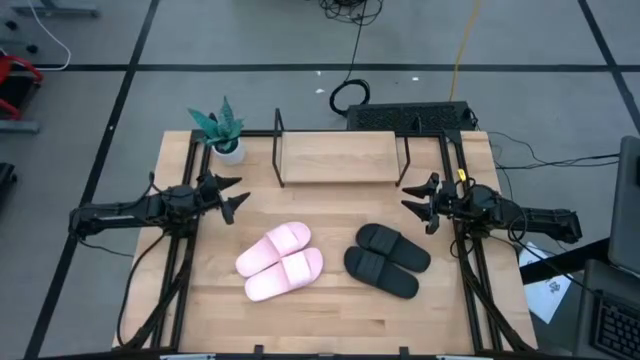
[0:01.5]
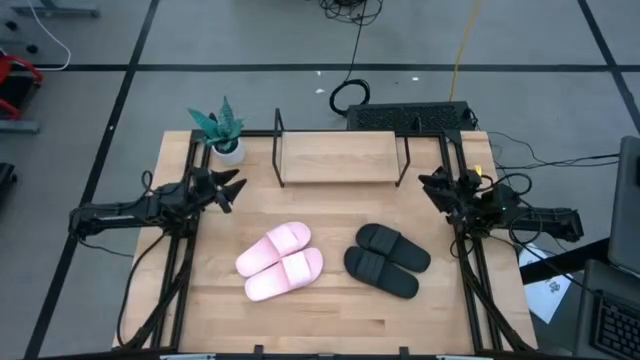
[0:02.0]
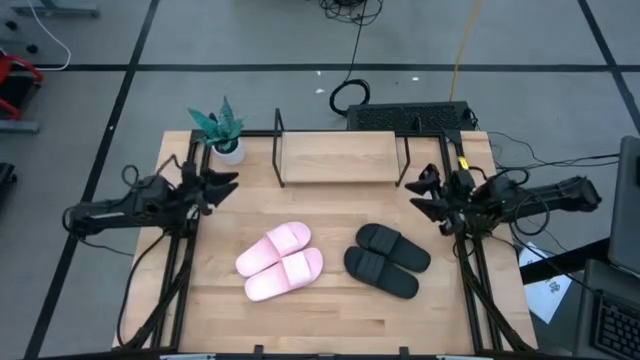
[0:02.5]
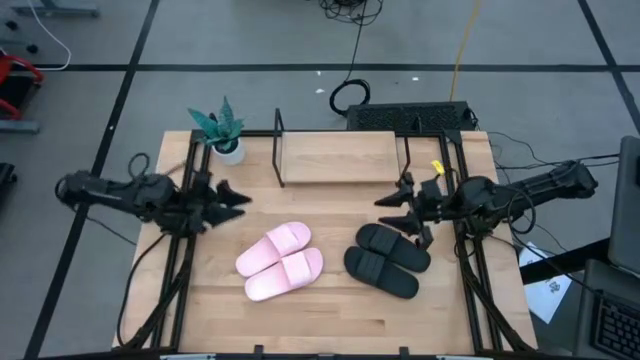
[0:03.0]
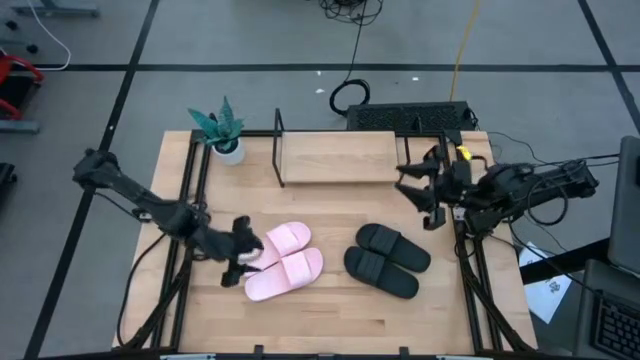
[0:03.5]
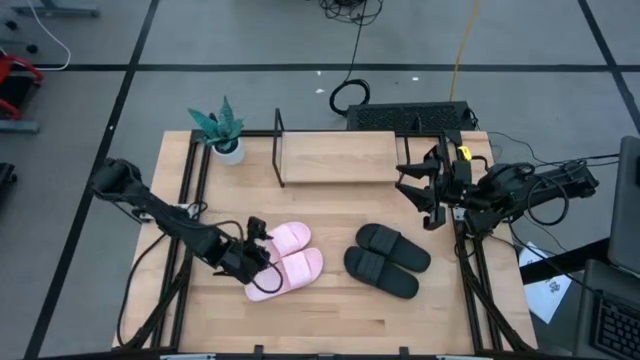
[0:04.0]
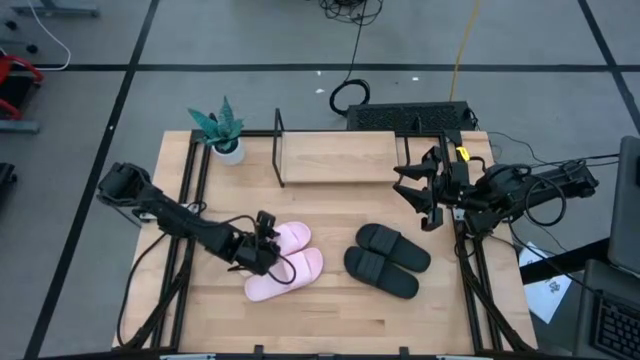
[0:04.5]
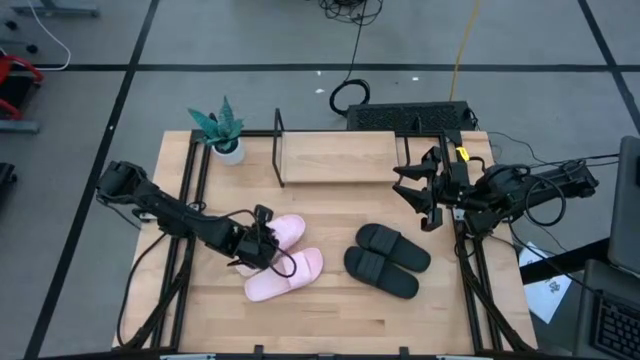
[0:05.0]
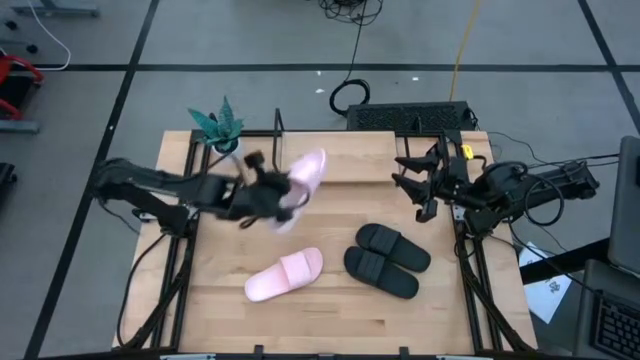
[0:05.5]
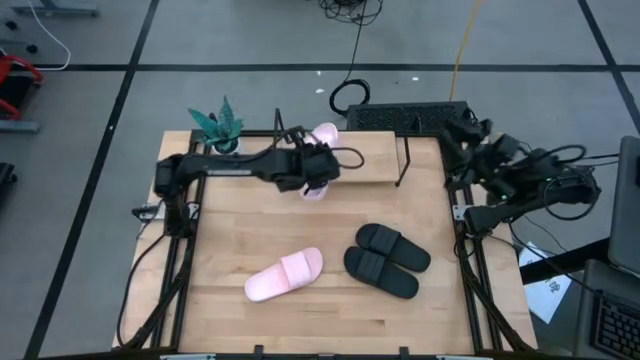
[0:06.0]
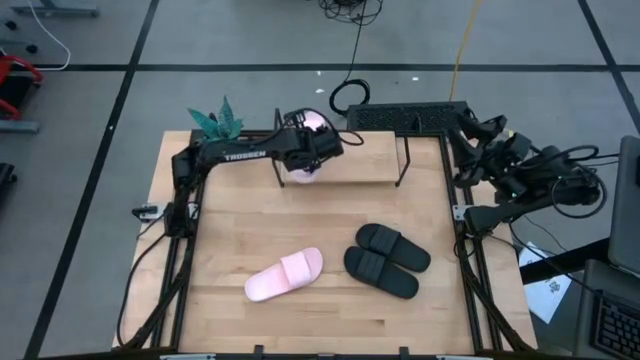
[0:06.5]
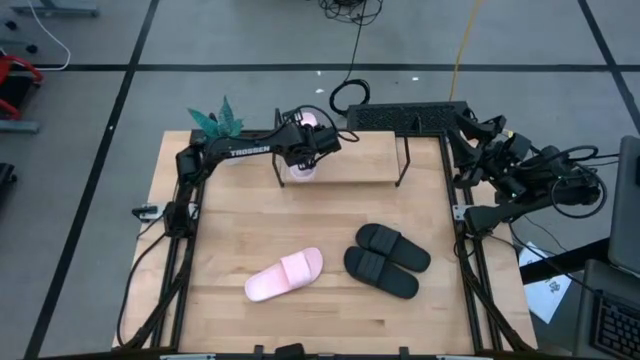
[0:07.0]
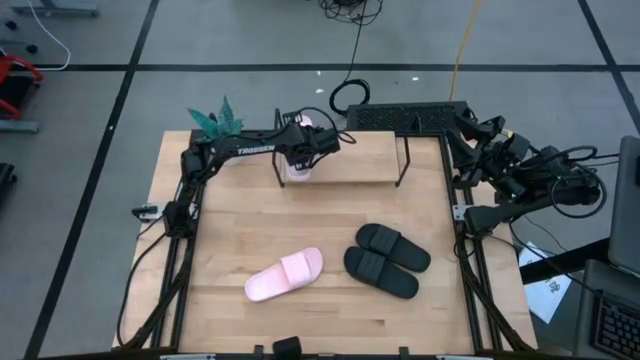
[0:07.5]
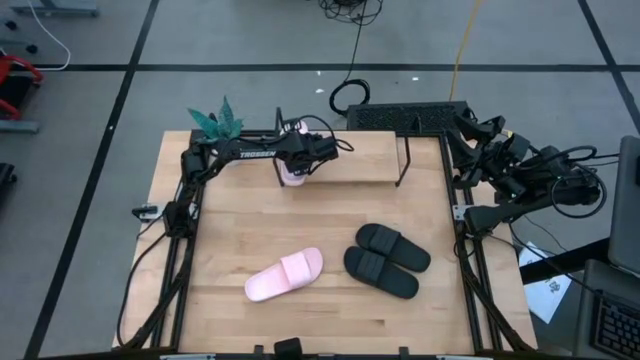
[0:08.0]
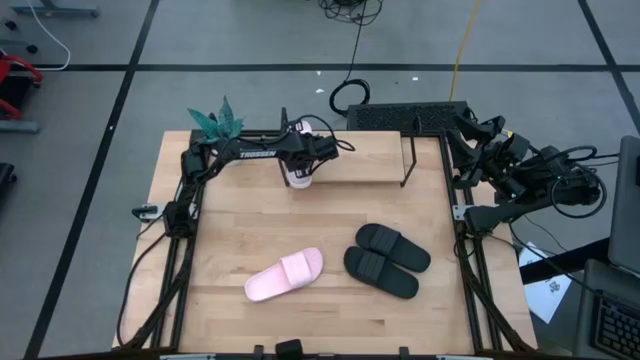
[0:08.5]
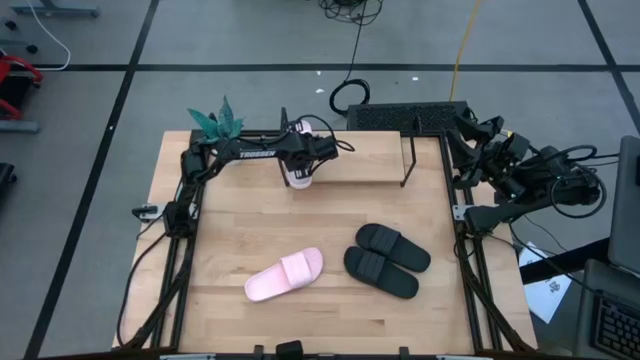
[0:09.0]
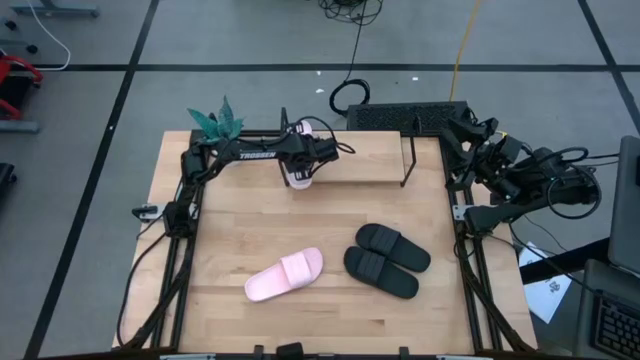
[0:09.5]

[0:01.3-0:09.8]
Task: Pick and place slides into the shelf
Put the top pink slipper onto the shelf

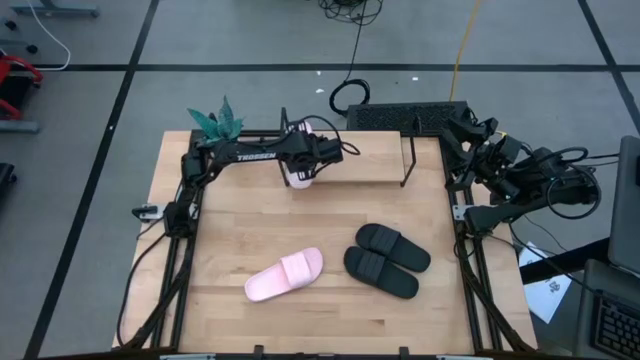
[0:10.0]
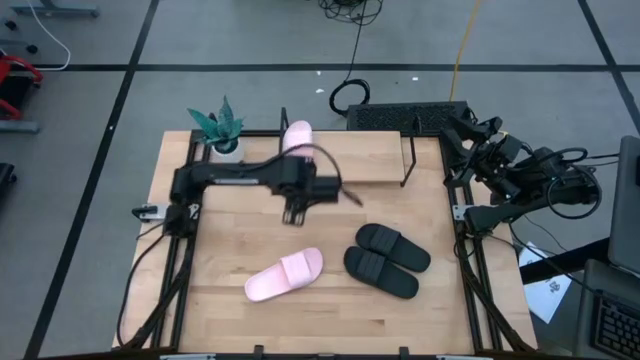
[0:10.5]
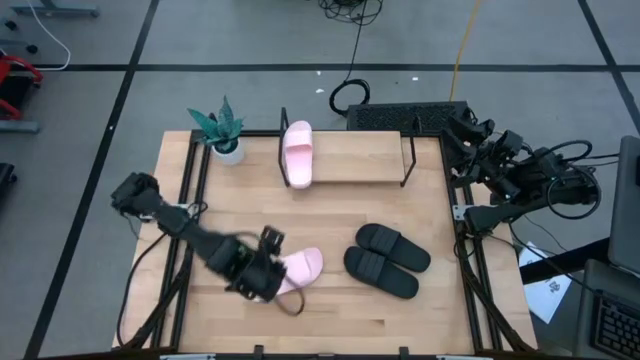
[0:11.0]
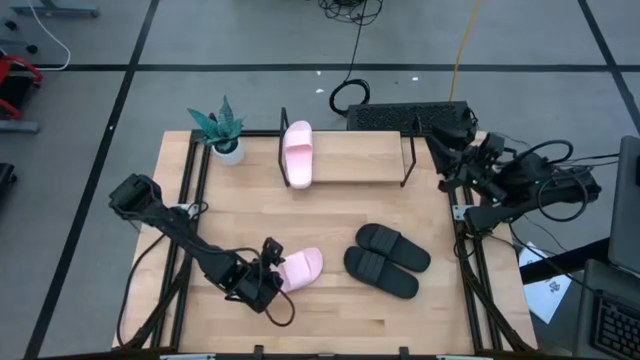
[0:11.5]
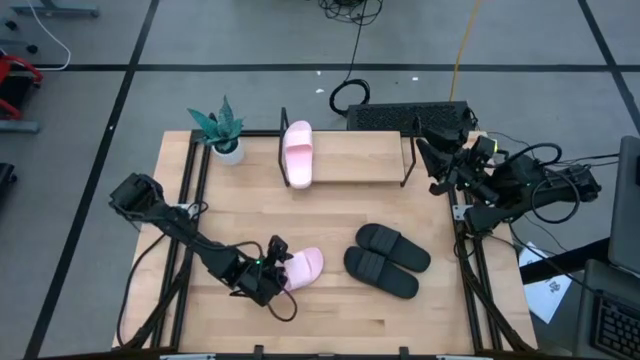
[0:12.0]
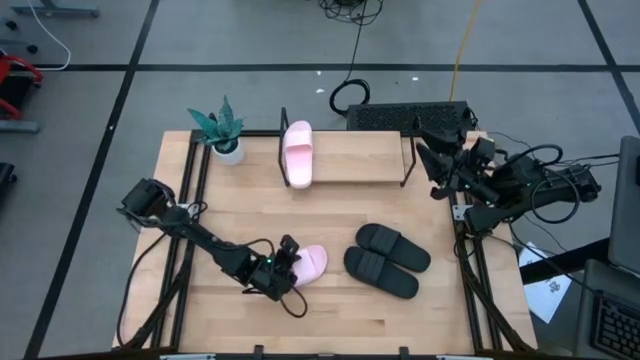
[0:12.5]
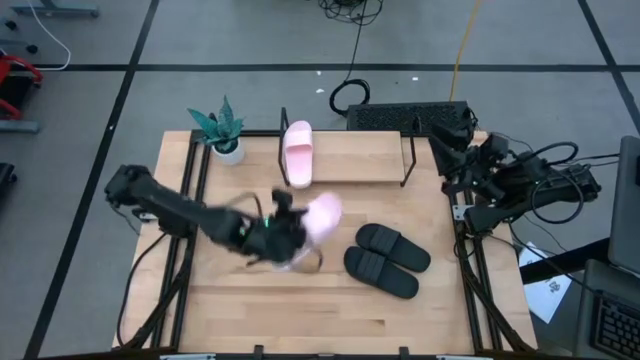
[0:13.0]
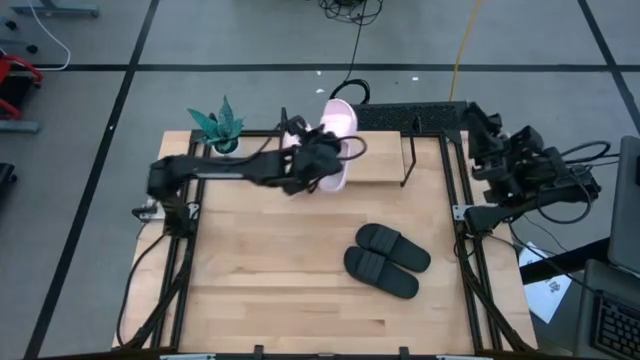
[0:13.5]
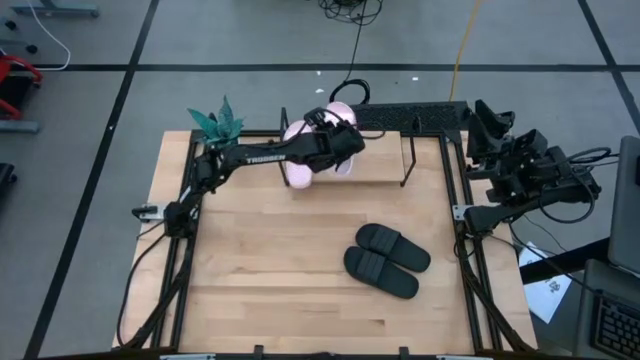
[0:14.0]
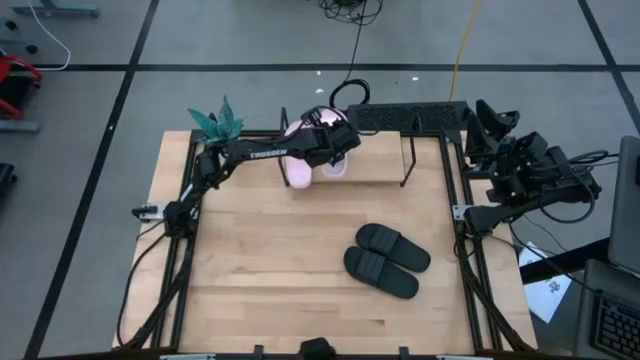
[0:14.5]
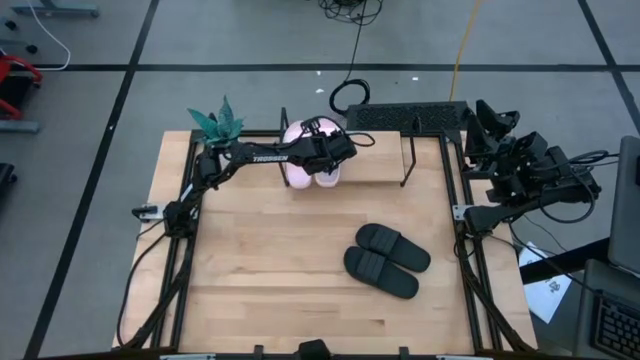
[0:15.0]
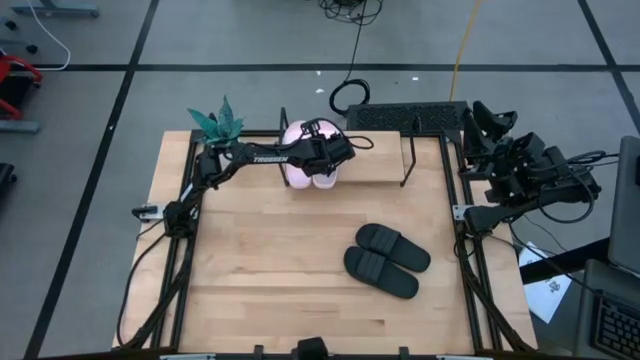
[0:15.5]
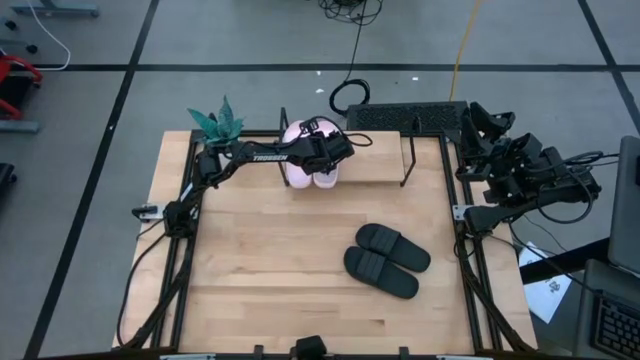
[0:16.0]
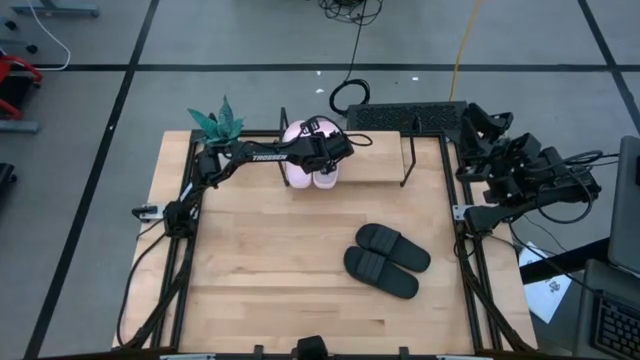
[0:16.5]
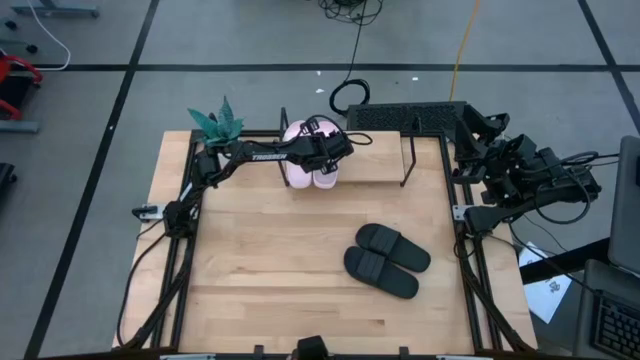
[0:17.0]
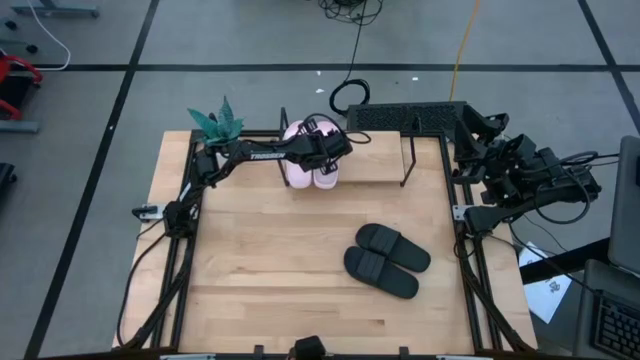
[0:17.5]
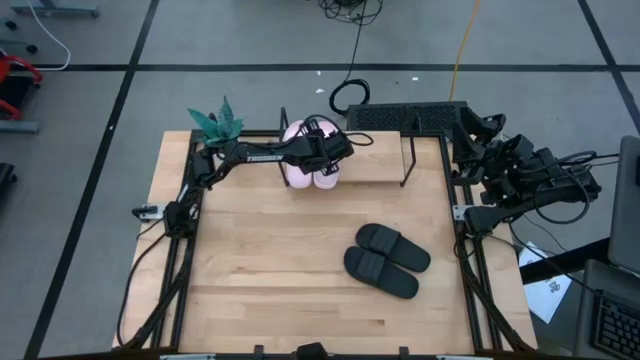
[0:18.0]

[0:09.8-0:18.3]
Put the pink slipper onto the shelf

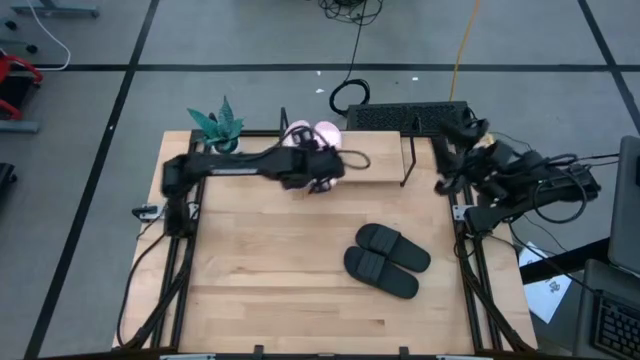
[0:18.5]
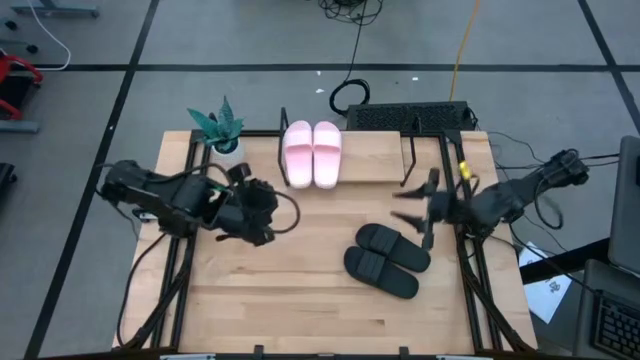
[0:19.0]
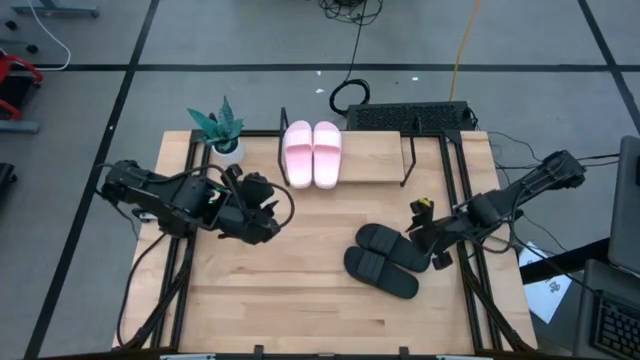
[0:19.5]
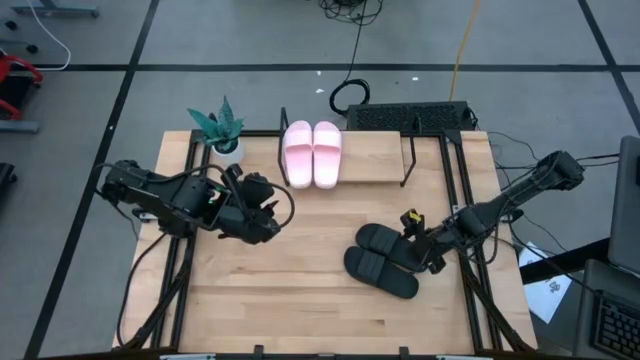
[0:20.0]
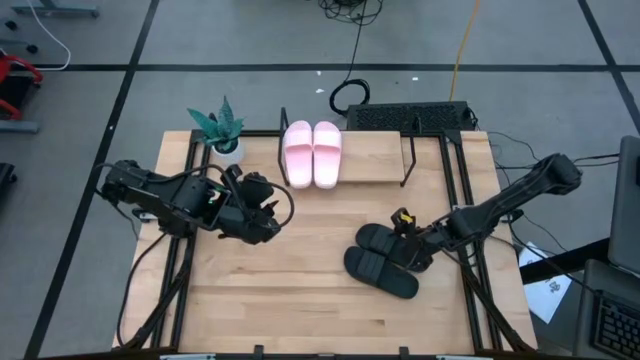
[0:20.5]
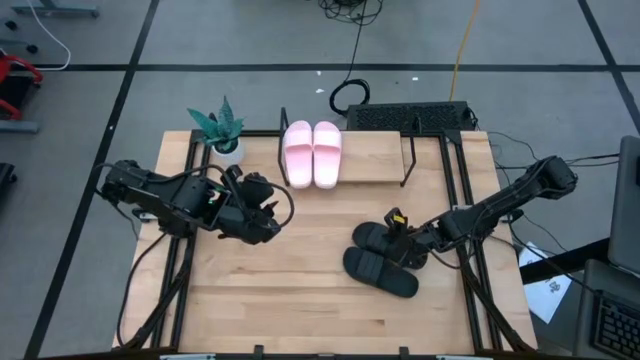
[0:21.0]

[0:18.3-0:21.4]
Put the top black slipper on the shelf
